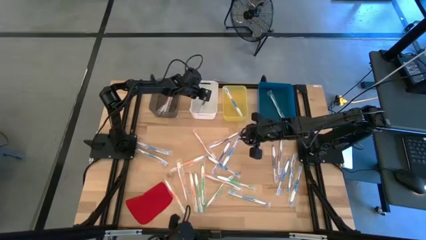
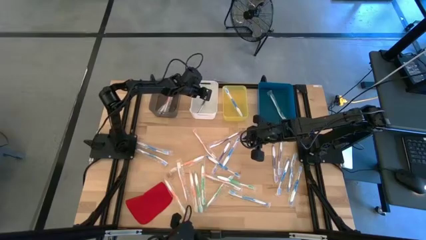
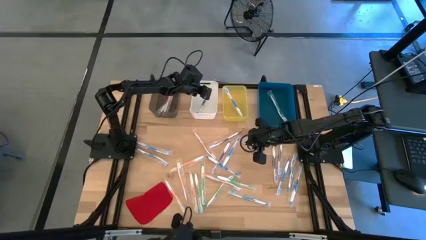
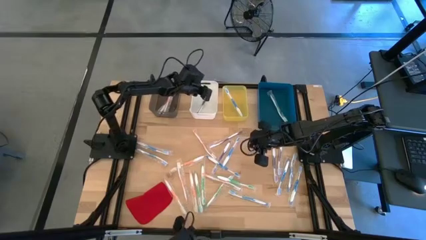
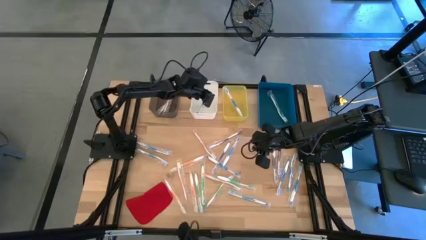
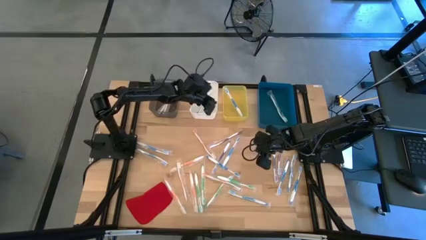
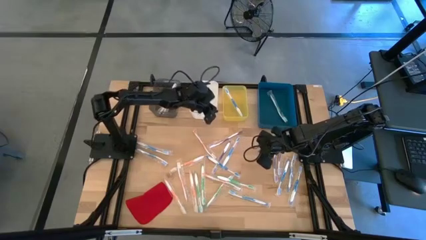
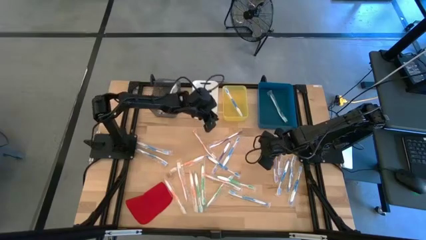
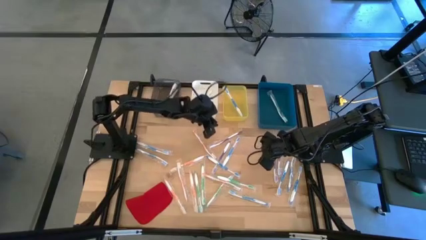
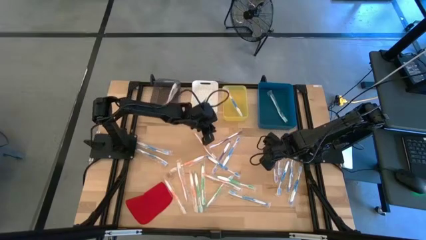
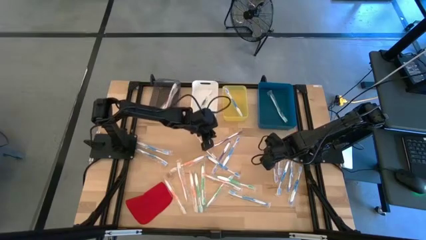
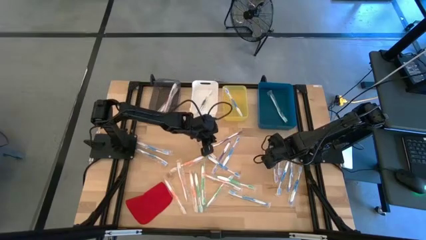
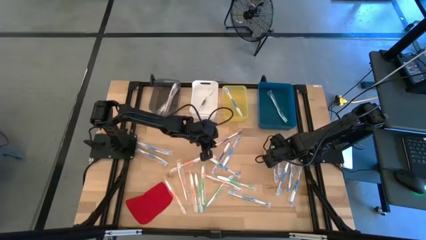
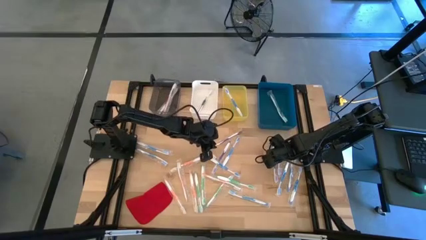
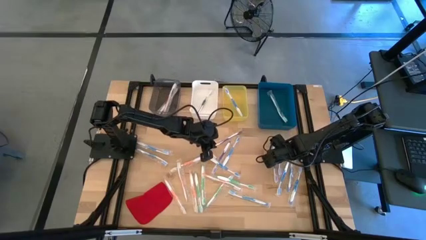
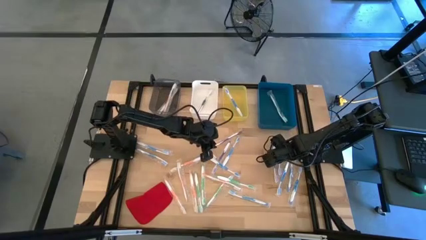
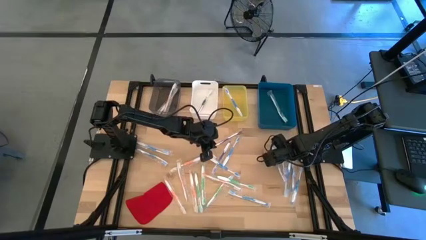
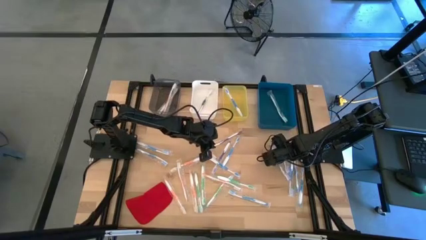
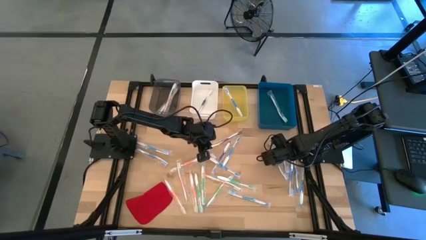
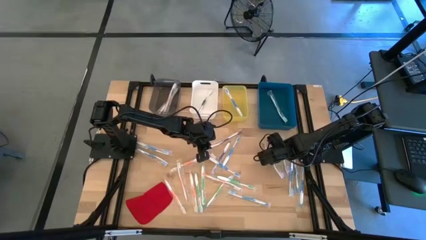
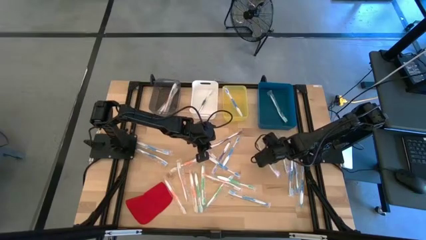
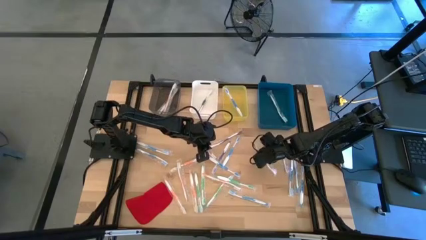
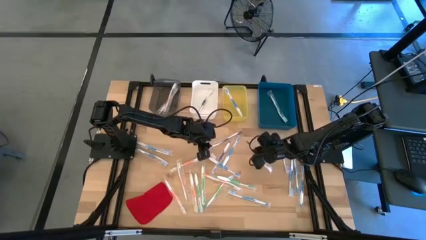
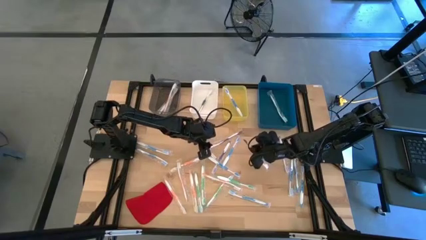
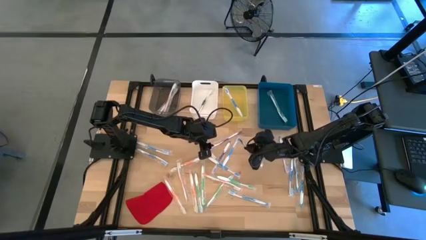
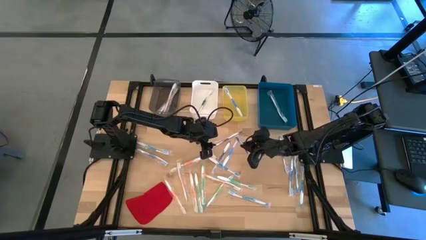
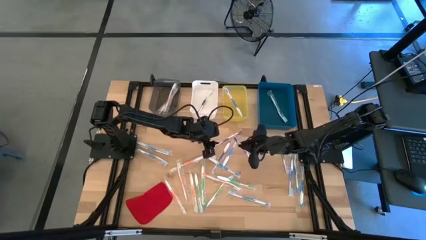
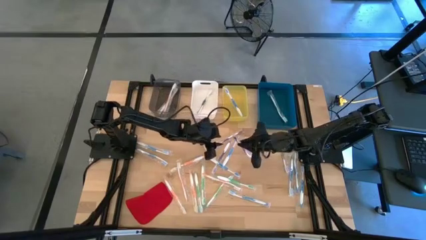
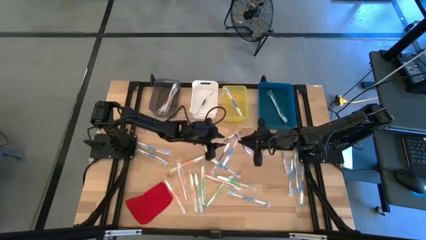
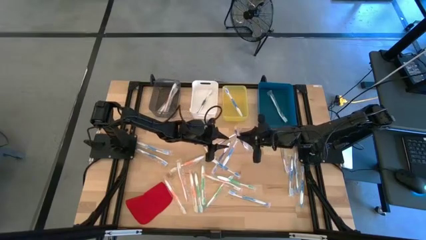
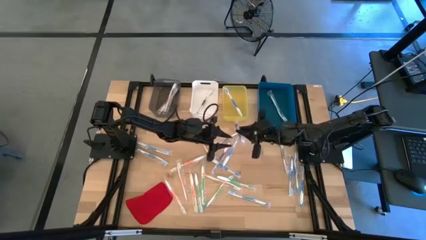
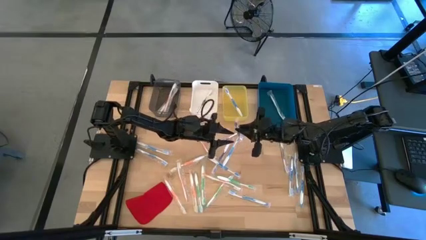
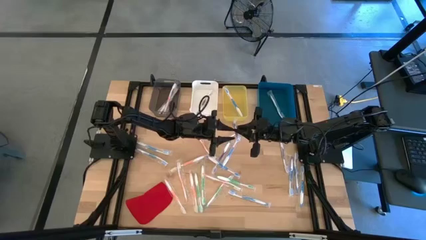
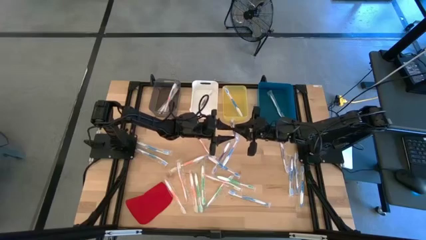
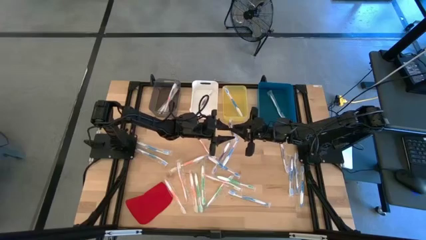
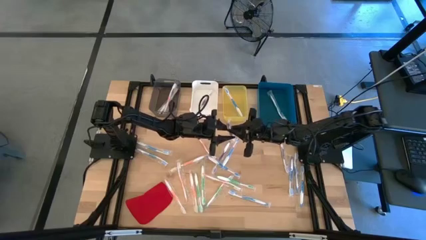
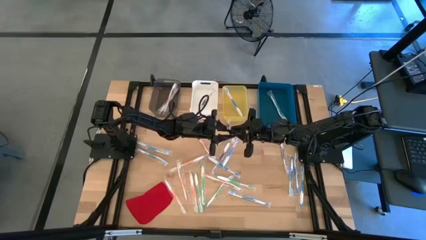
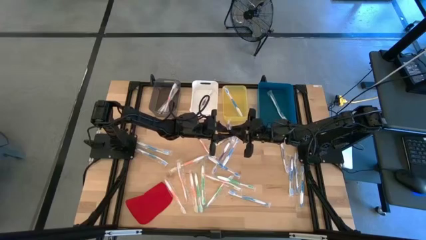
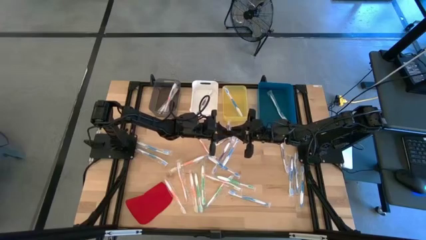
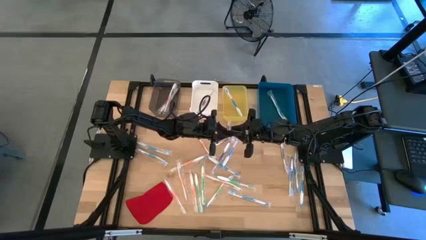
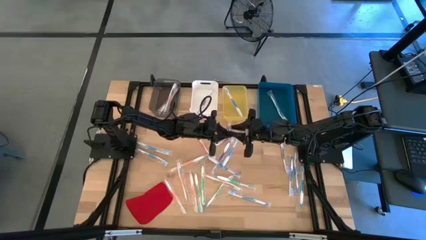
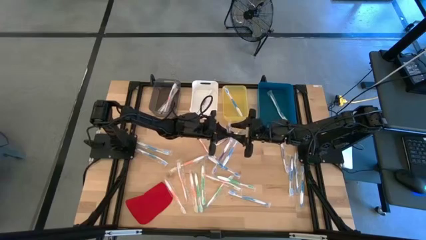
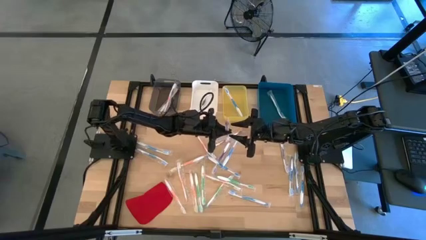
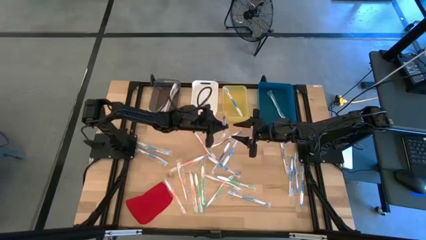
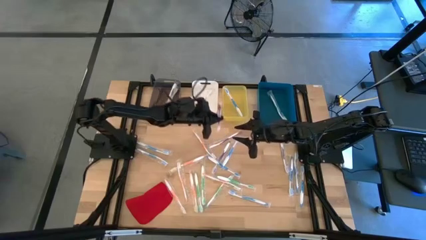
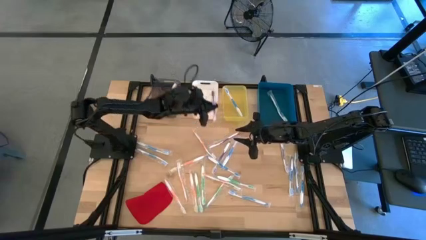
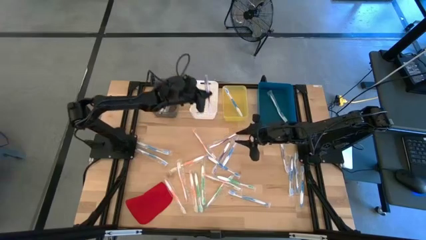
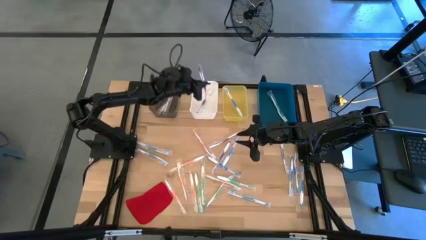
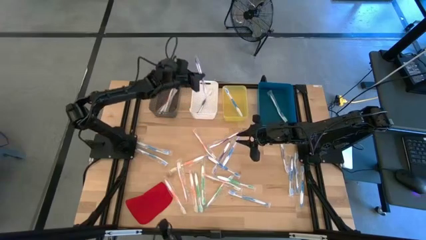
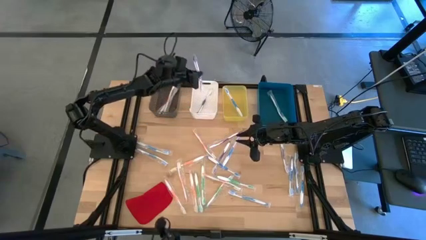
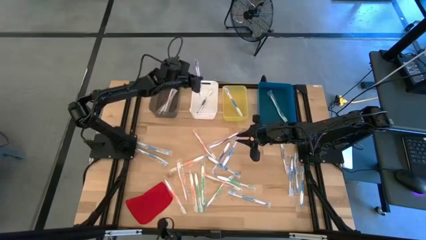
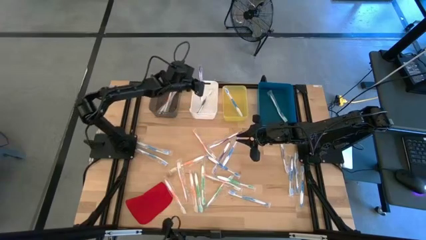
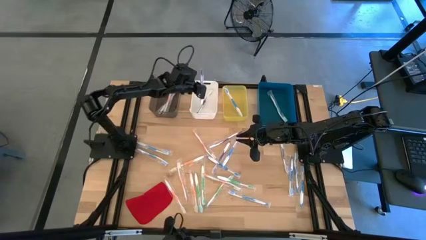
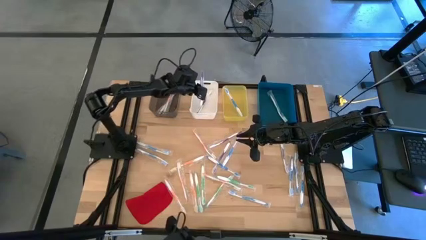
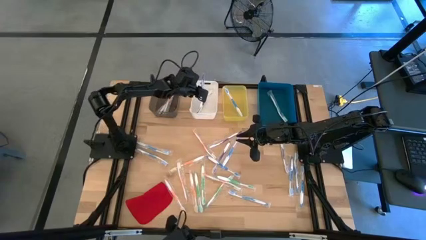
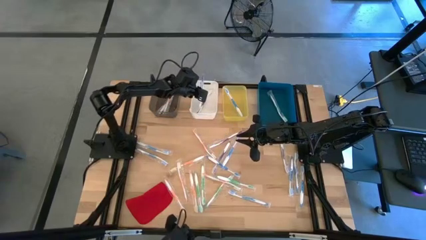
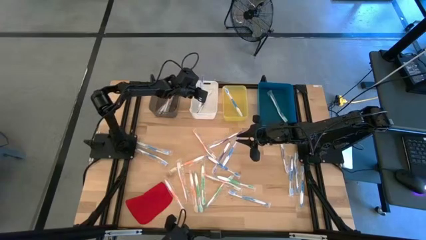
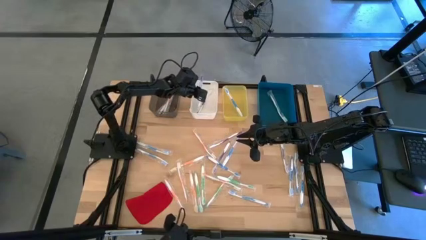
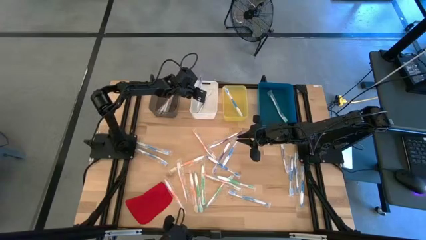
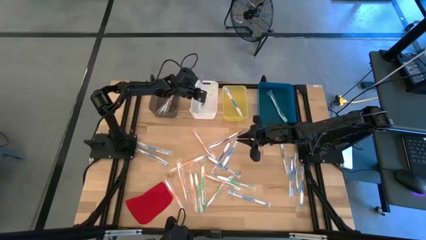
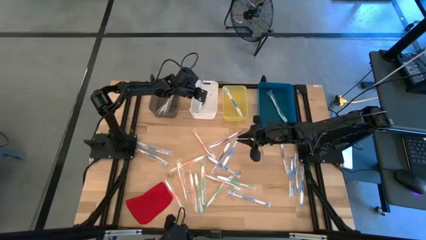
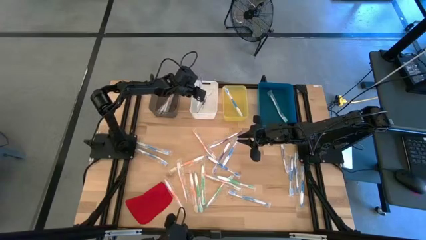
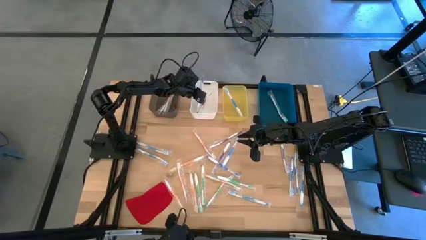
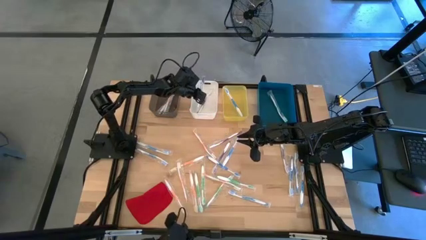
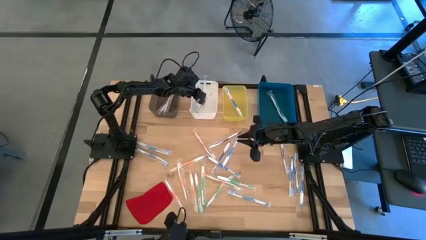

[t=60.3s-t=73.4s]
Task: Pick & Place Toothbrushes
Put the violet toothbrush into the white bin

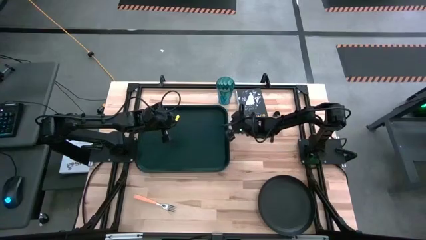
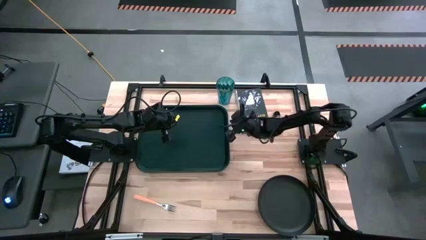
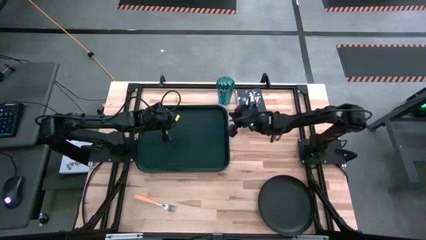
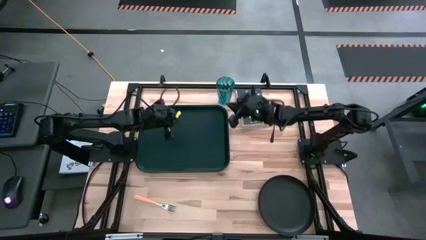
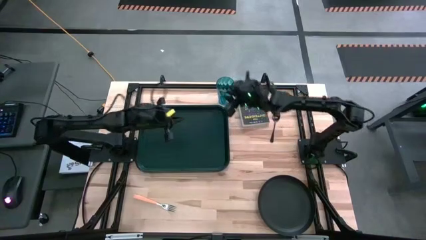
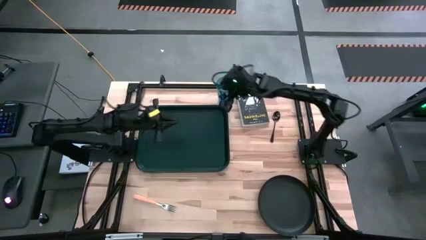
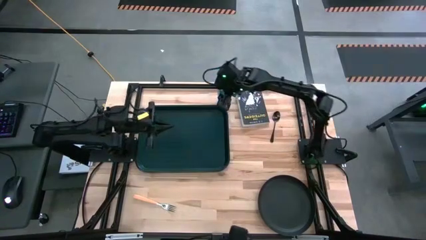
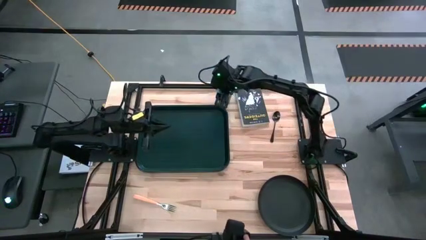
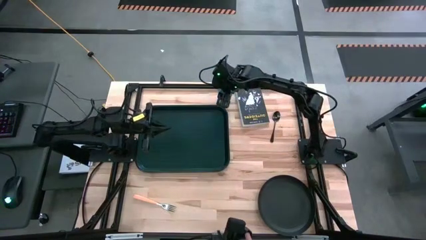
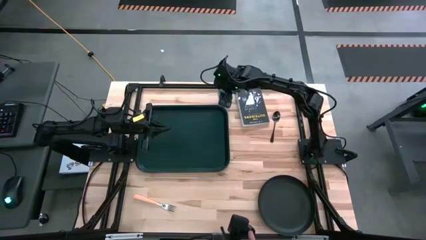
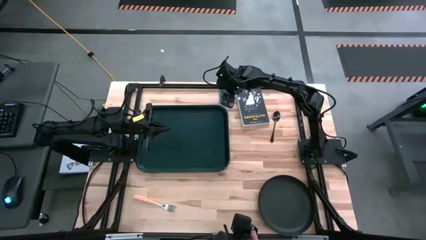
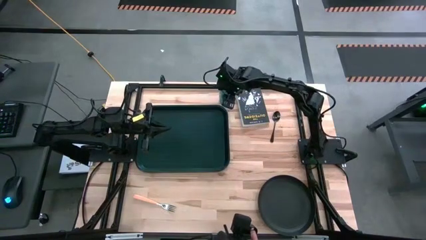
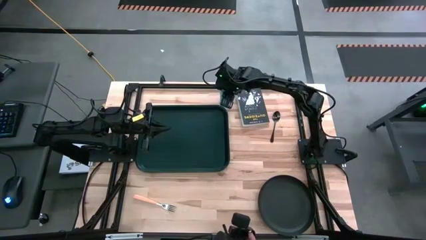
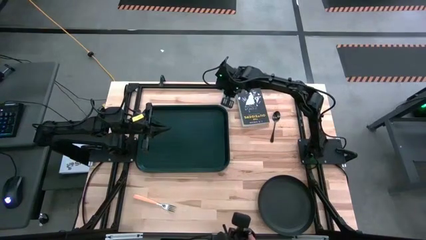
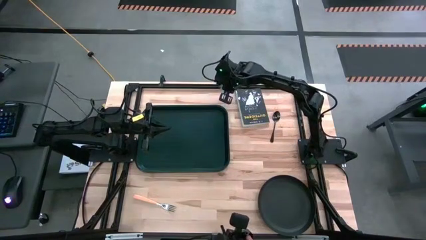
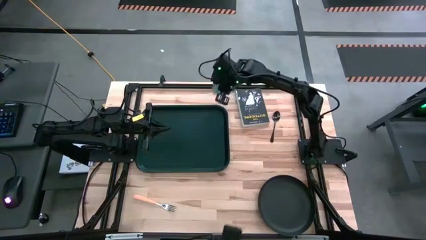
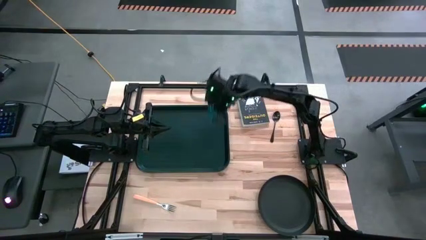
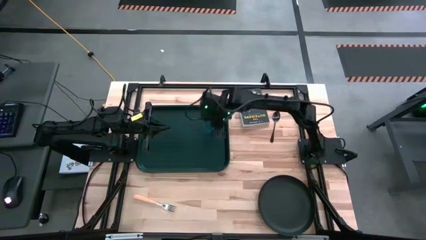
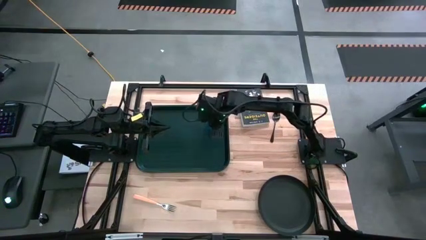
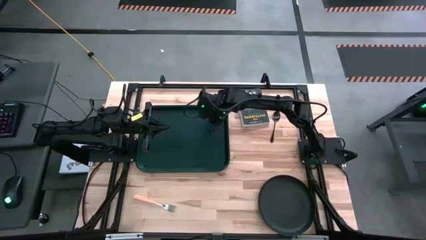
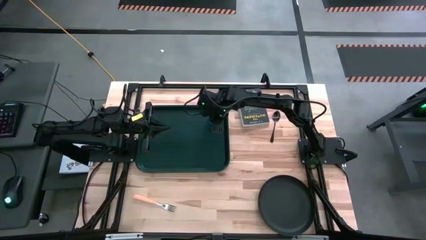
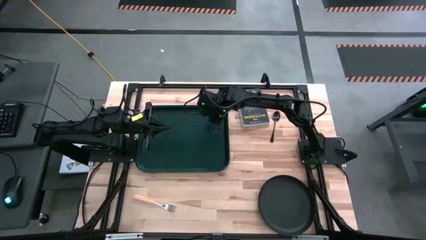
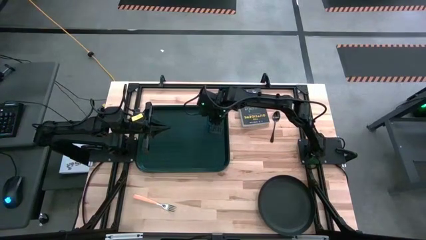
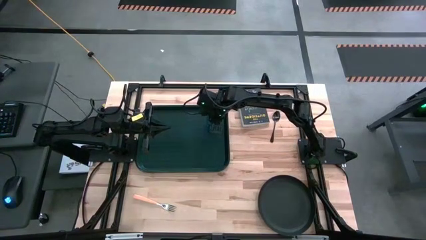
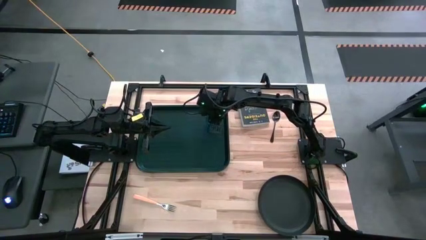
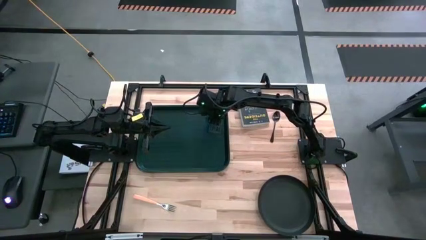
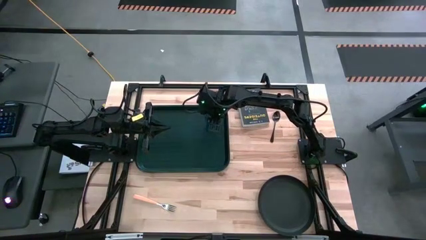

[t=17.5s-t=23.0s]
Task: Pick and place plate/cup/fork/spoon on tray
Put the blue cup on the top right of the black tray
